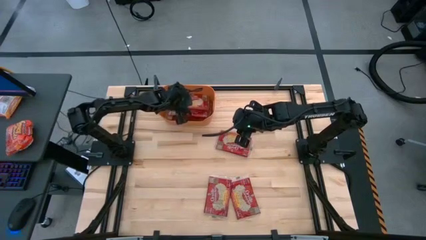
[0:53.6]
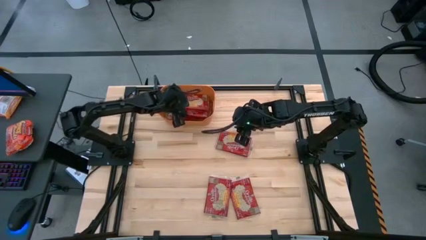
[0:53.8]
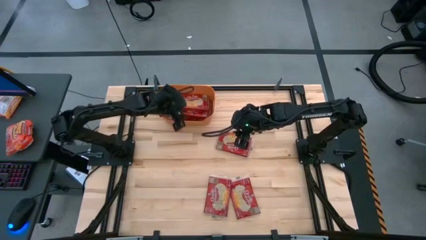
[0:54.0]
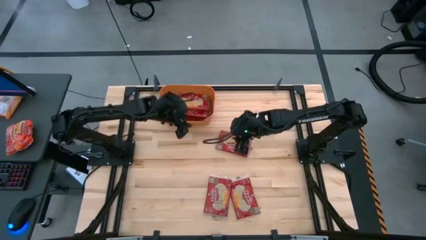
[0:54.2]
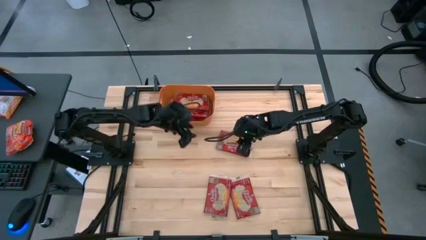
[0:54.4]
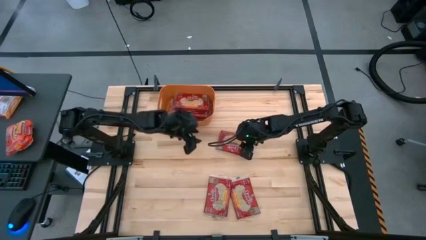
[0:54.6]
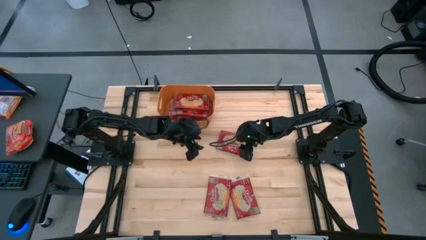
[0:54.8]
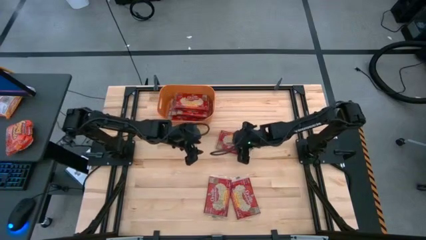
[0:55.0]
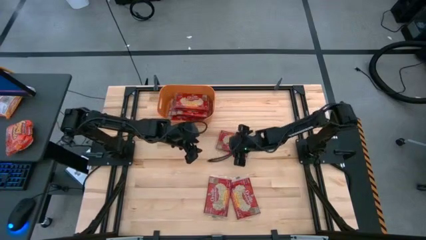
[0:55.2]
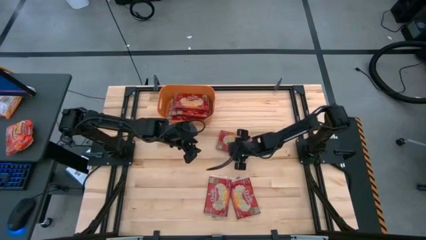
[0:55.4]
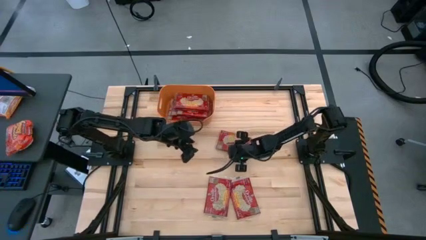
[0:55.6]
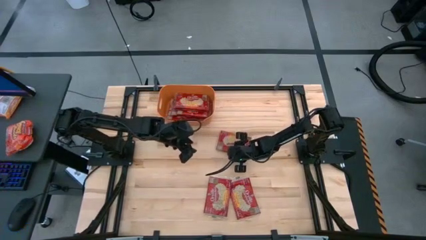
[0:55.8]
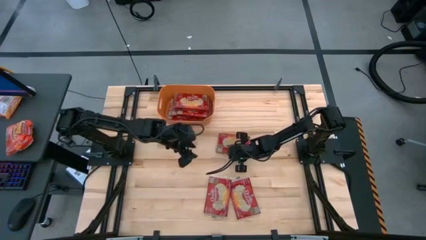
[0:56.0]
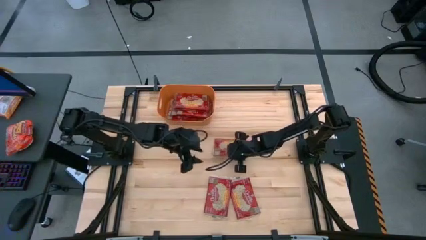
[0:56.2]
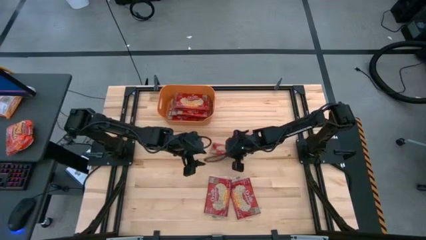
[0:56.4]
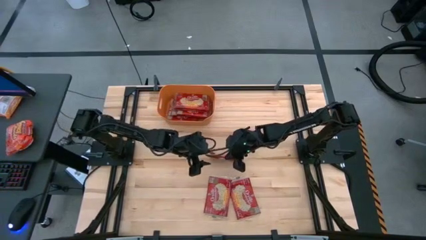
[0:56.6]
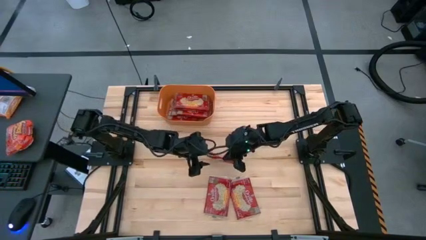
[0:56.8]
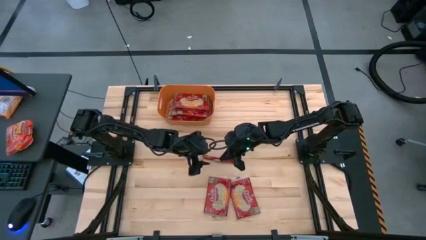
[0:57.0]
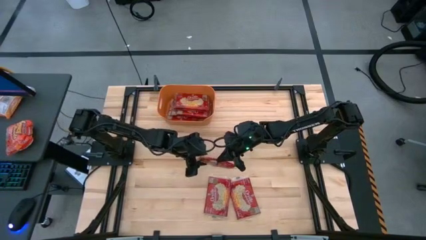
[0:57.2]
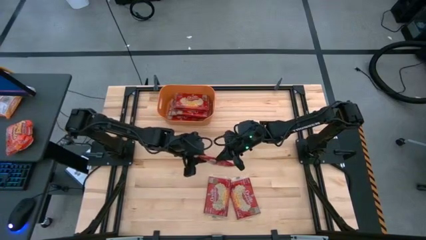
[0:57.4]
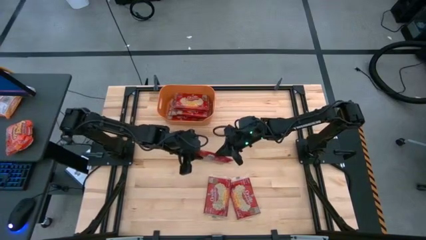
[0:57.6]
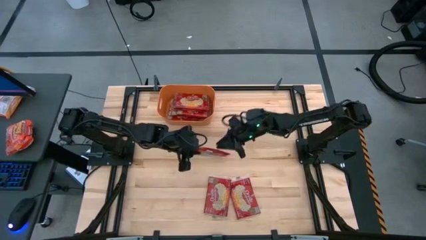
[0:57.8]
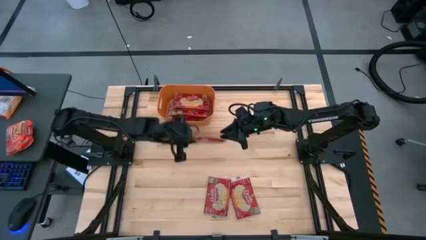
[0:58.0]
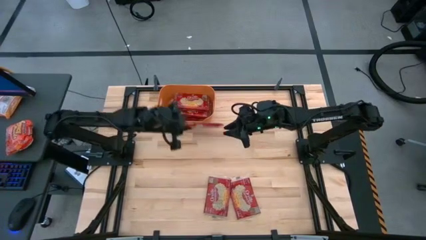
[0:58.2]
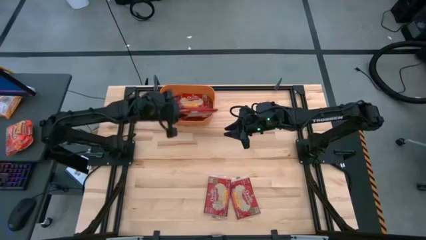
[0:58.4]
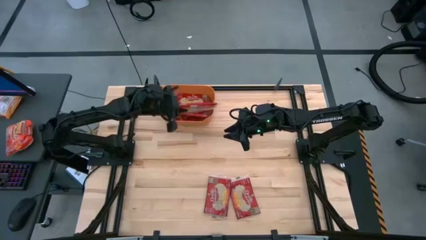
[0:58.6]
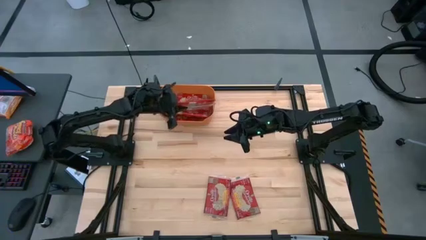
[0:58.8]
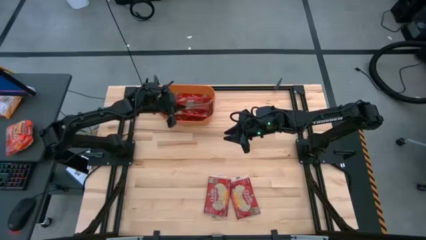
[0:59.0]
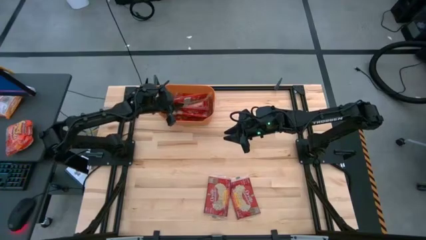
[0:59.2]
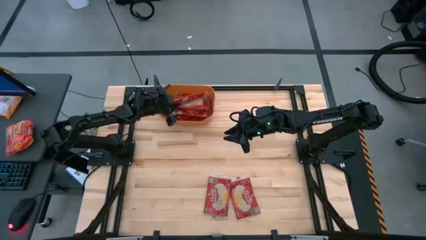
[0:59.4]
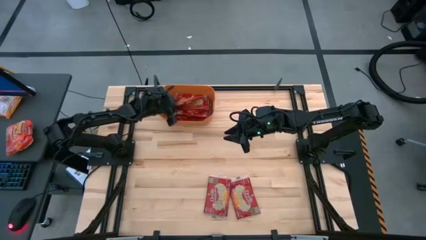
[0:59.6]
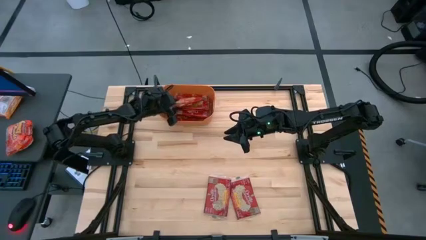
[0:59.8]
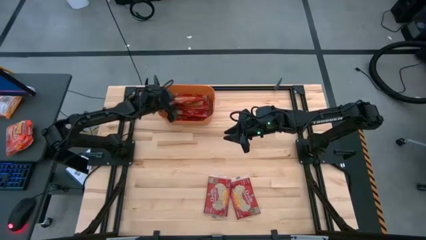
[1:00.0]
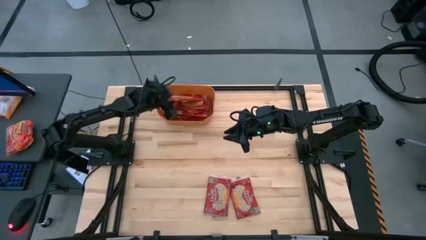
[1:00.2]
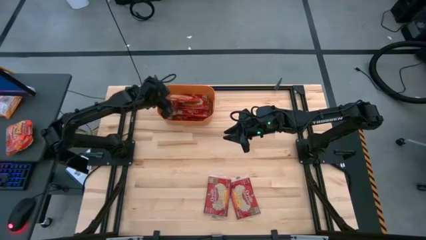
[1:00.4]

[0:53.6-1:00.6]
Task: Sort popcorn bags into baskets
Put the red popcorn bag into the orange bin

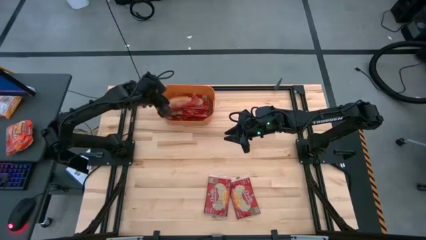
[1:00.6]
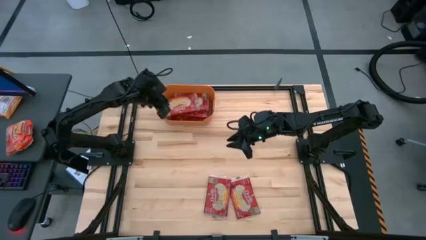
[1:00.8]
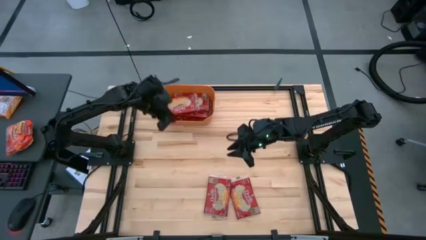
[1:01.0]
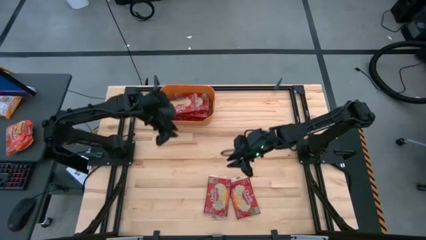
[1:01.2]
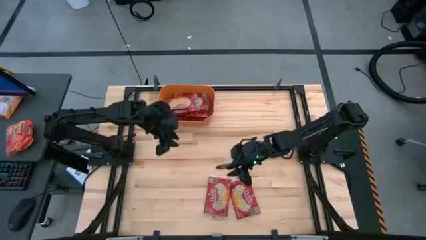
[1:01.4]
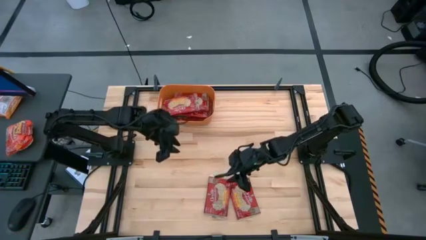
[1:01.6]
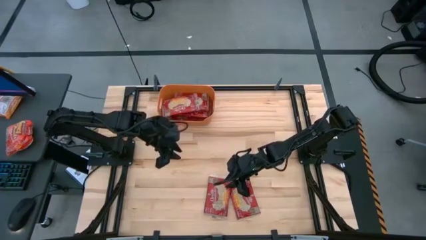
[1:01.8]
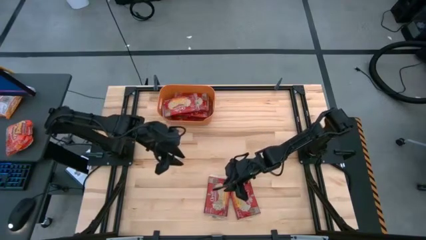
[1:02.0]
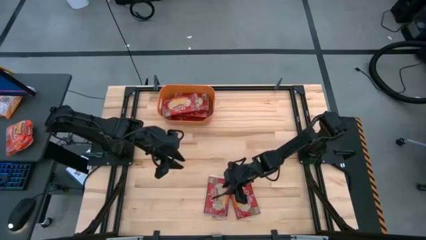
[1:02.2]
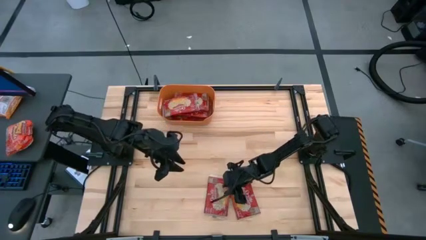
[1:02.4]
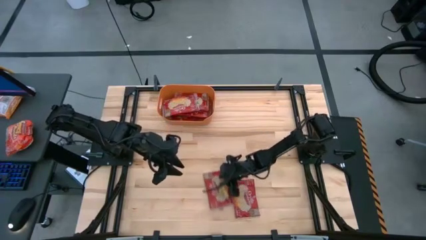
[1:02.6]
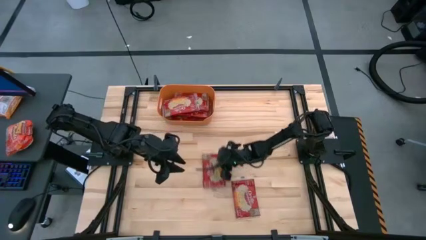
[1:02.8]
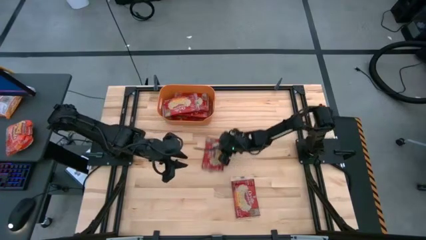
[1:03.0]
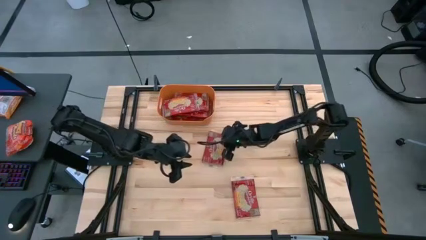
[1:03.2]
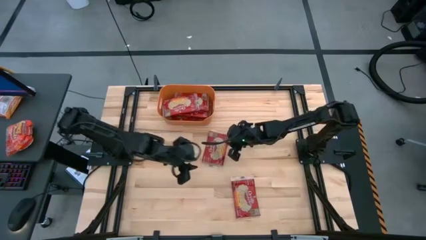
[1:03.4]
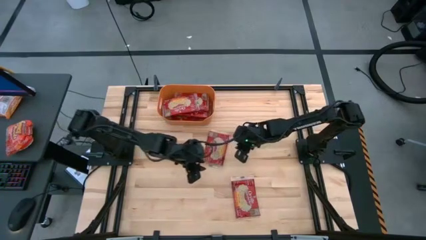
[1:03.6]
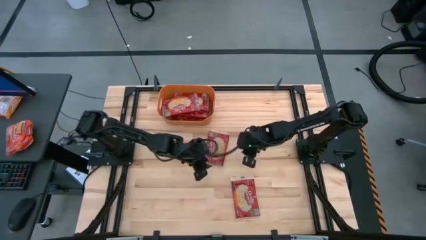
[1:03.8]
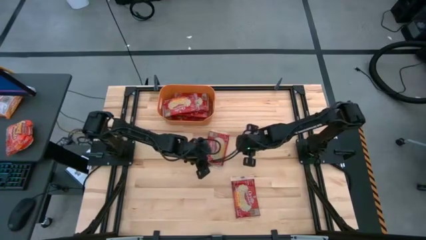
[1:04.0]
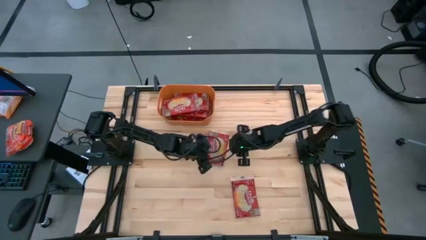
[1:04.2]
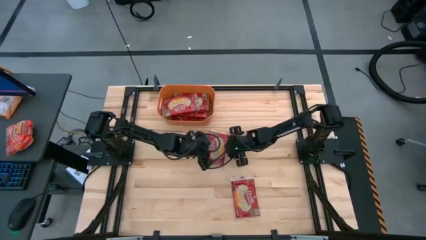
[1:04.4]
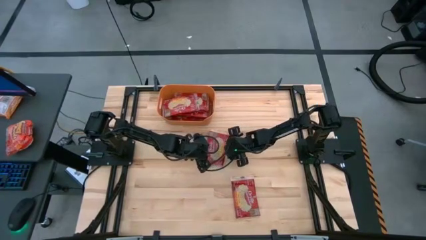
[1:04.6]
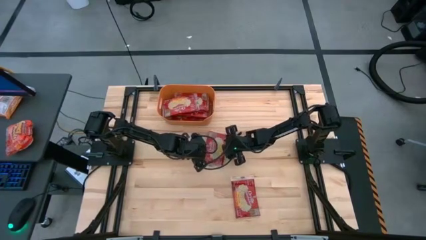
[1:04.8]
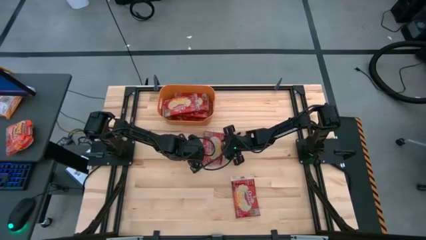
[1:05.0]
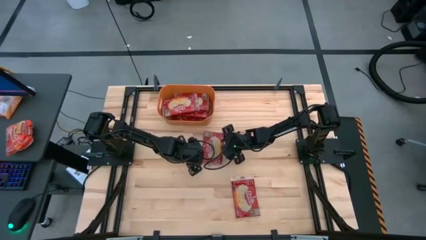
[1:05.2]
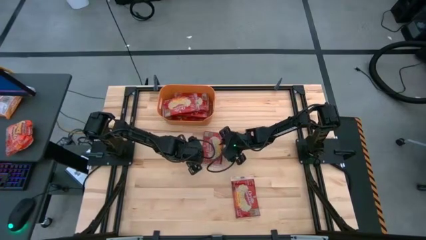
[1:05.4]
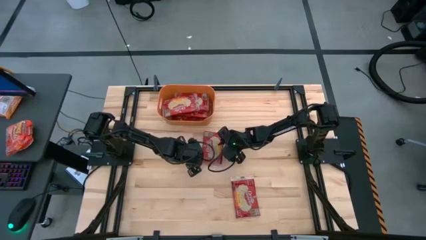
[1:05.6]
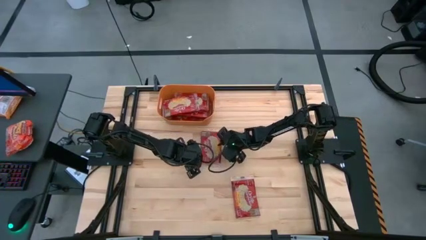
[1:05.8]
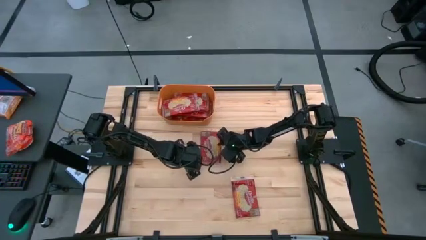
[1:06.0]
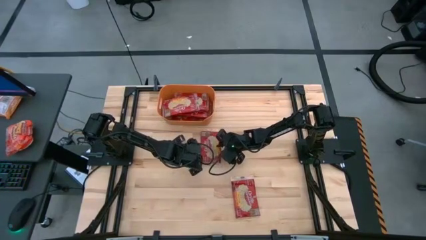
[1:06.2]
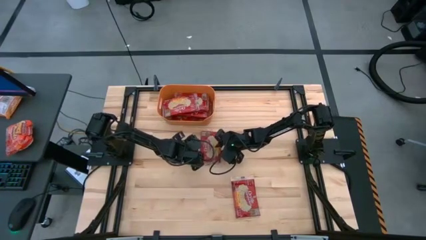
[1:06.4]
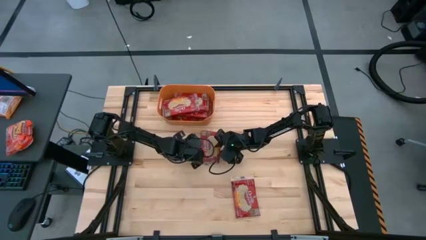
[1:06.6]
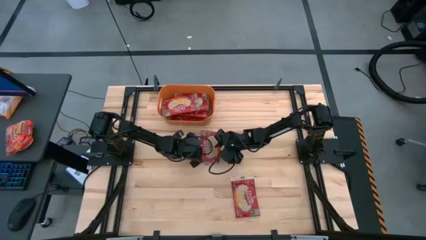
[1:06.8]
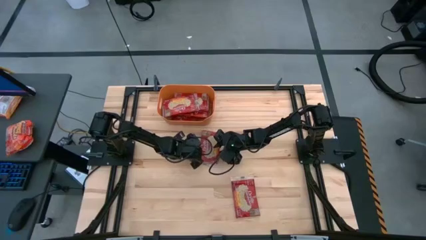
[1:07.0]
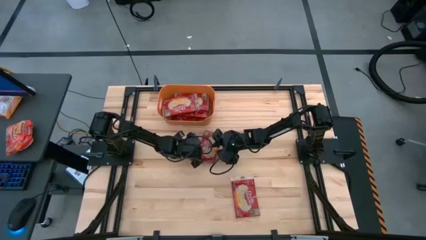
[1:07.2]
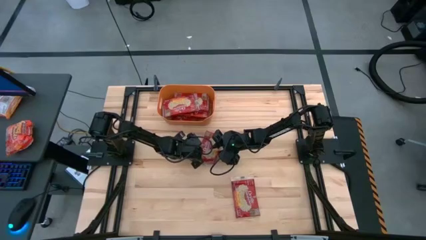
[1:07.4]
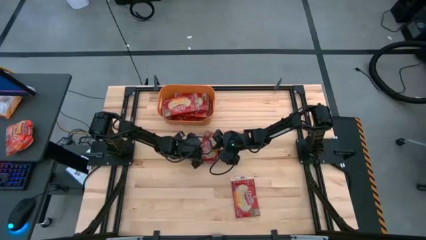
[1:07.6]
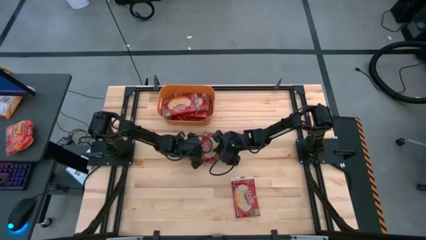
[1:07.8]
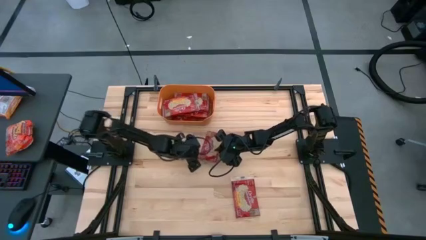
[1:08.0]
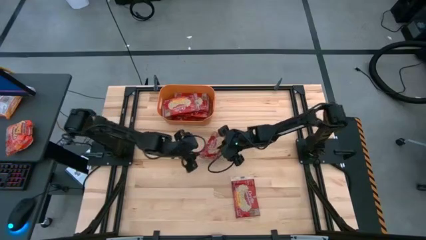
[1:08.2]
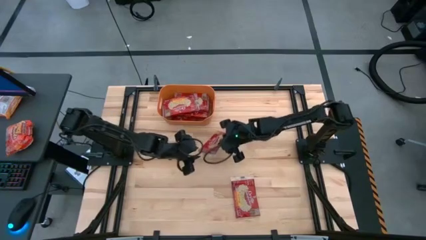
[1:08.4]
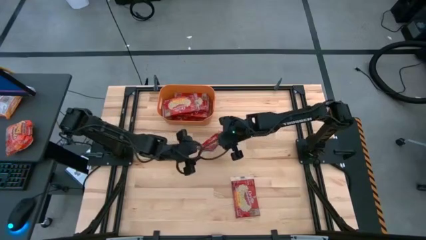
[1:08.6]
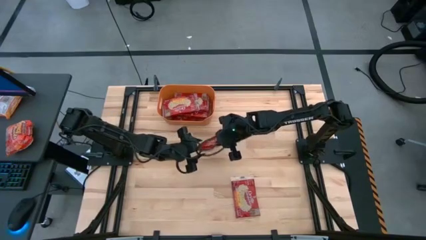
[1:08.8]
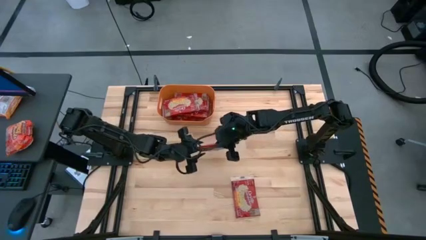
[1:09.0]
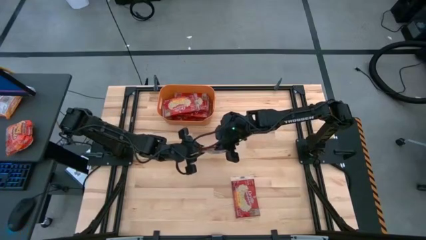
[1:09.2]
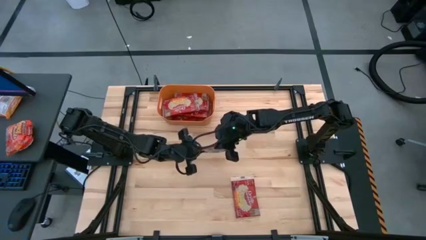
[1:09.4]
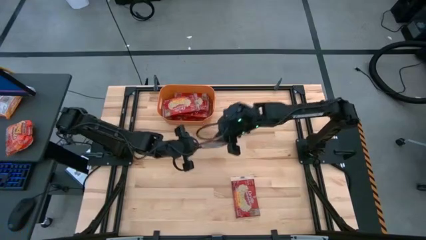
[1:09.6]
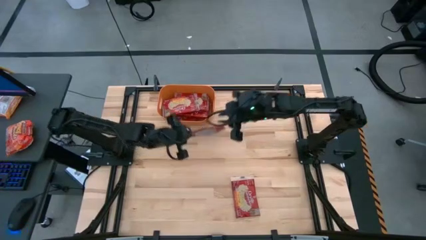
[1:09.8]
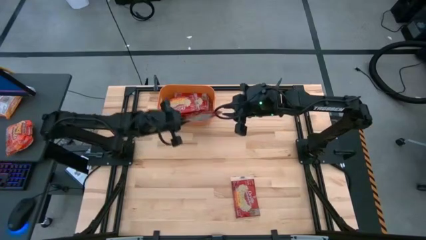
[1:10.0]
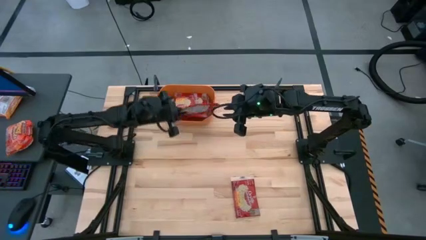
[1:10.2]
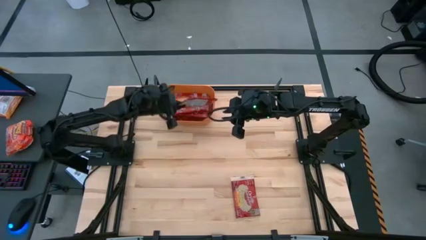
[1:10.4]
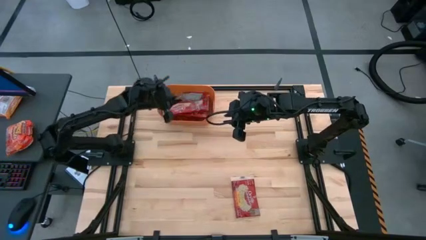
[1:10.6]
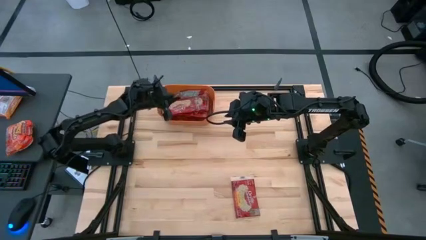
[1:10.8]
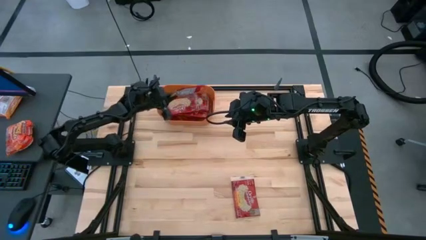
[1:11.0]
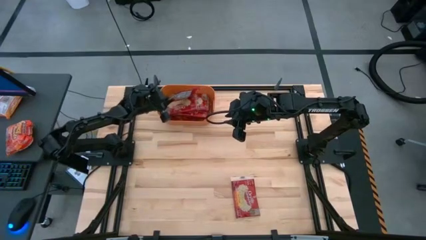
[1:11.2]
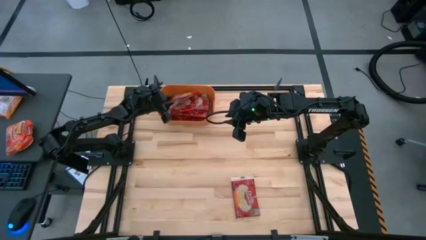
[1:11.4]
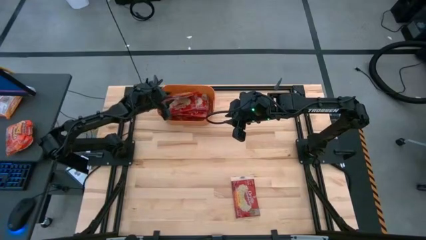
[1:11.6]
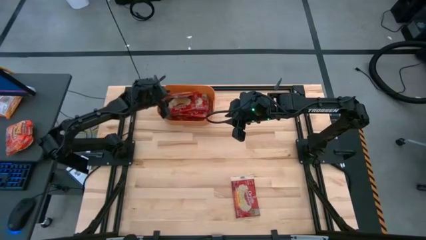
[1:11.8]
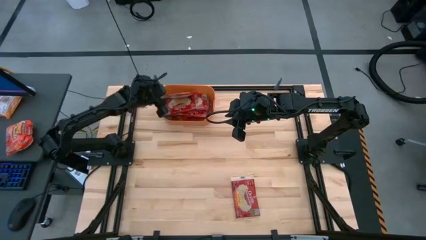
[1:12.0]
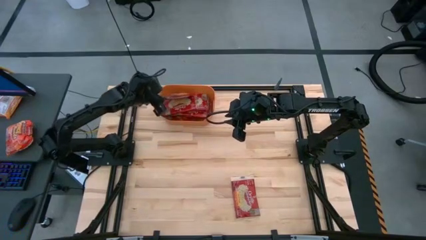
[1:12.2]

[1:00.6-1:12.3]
Put the red popcorn bag into the orange bin
